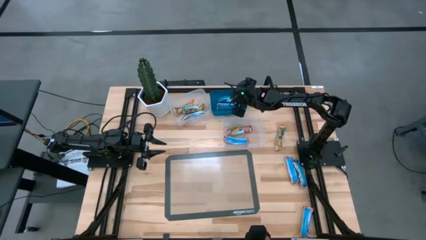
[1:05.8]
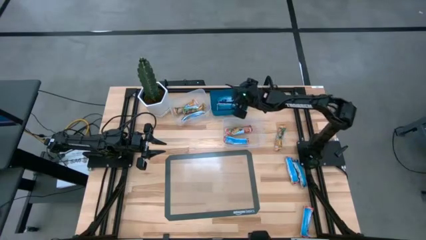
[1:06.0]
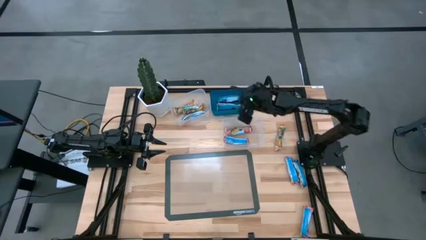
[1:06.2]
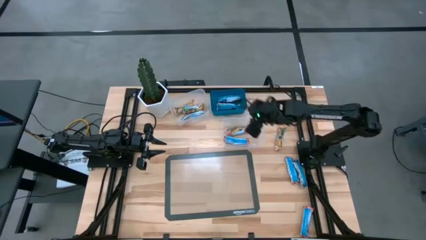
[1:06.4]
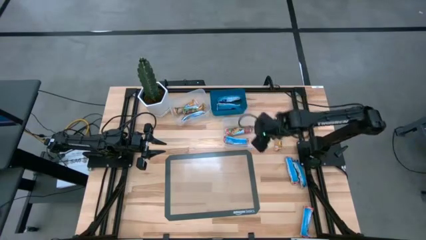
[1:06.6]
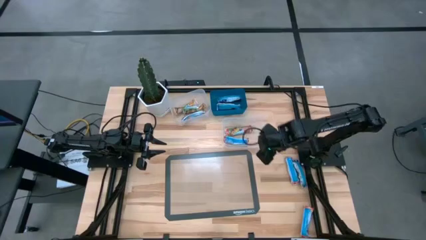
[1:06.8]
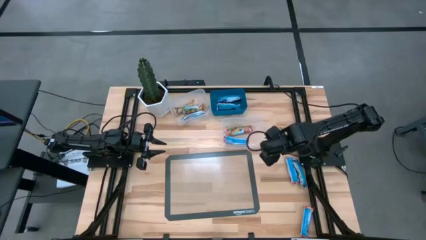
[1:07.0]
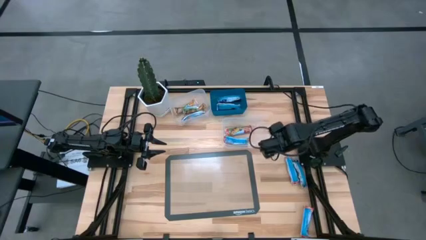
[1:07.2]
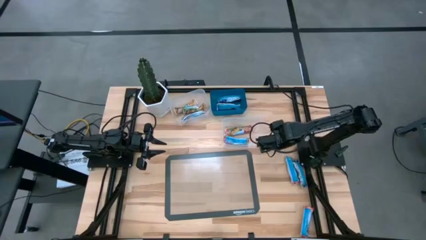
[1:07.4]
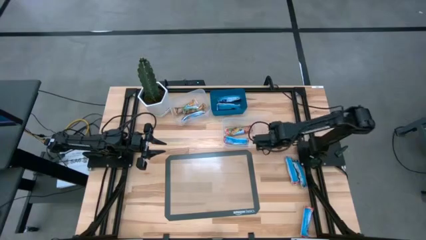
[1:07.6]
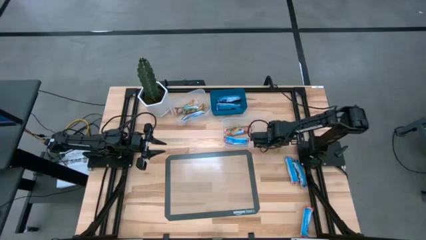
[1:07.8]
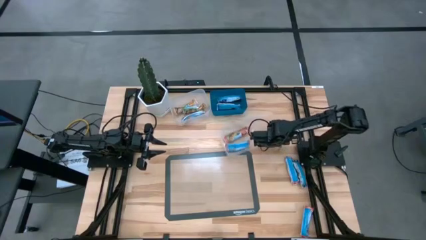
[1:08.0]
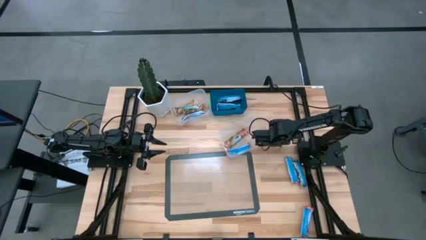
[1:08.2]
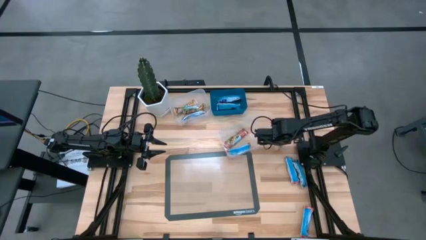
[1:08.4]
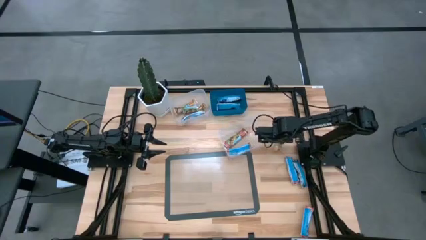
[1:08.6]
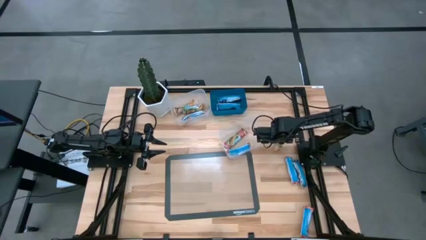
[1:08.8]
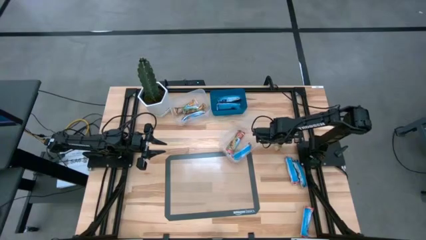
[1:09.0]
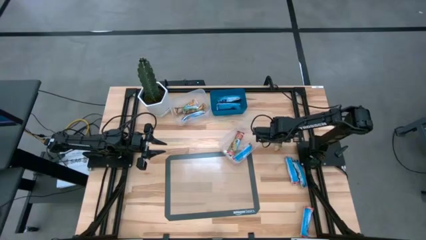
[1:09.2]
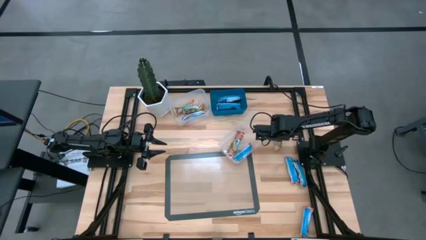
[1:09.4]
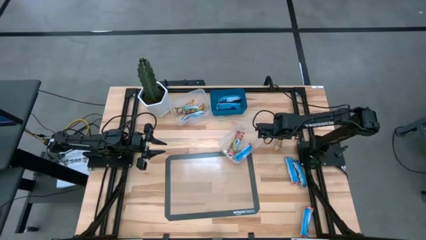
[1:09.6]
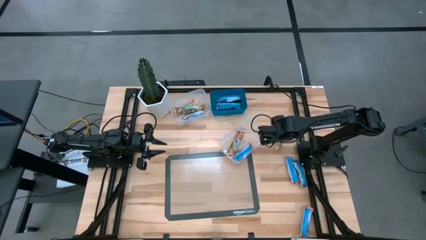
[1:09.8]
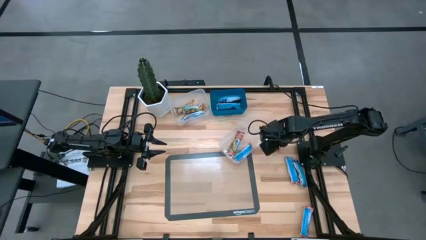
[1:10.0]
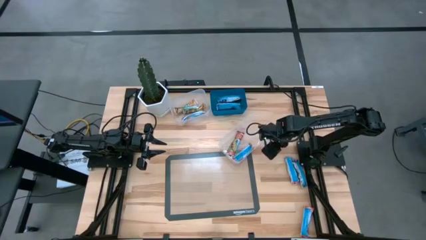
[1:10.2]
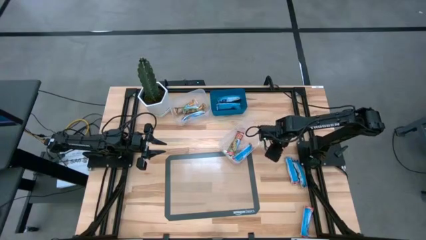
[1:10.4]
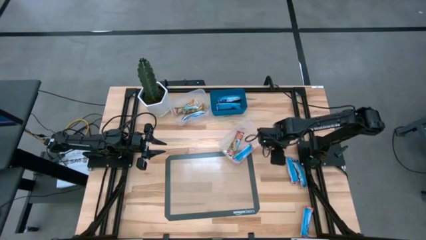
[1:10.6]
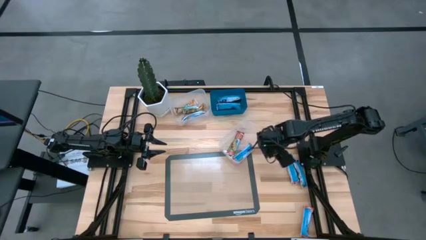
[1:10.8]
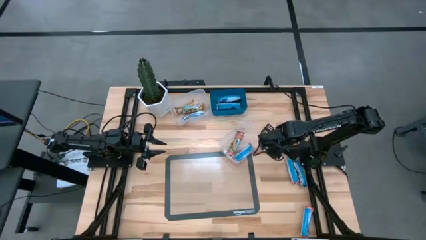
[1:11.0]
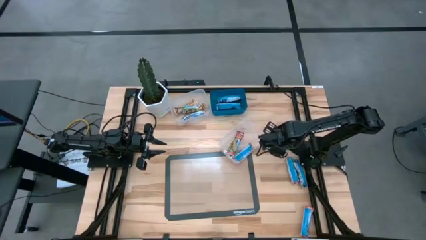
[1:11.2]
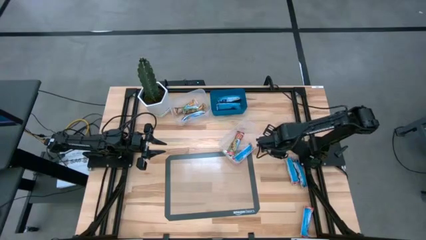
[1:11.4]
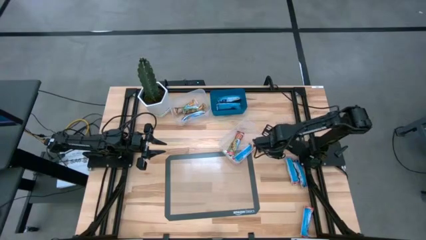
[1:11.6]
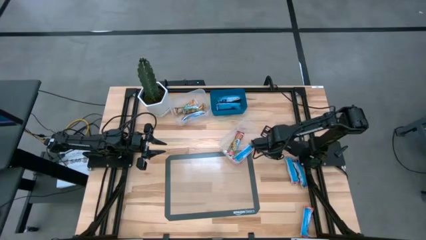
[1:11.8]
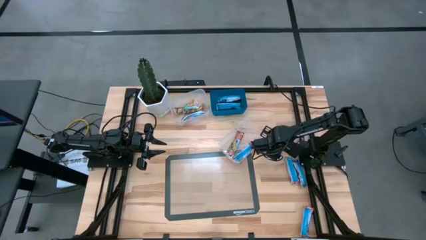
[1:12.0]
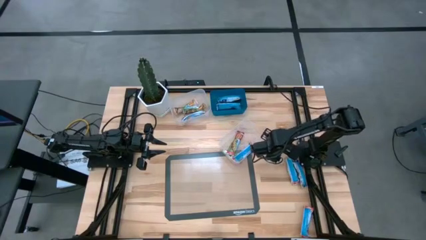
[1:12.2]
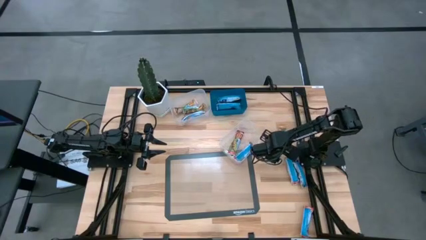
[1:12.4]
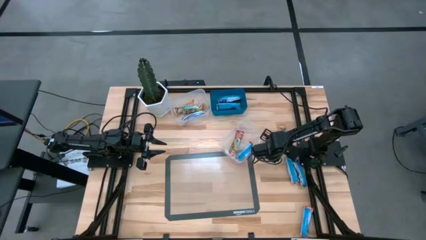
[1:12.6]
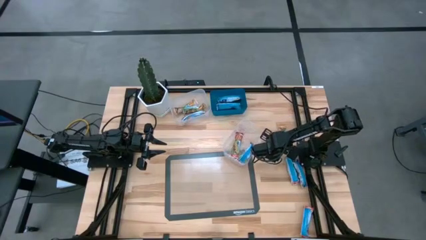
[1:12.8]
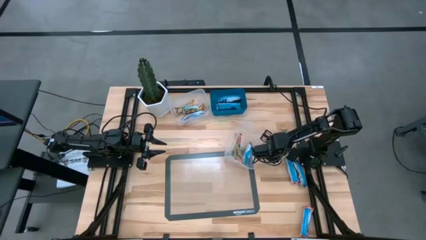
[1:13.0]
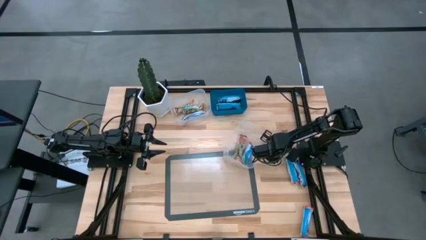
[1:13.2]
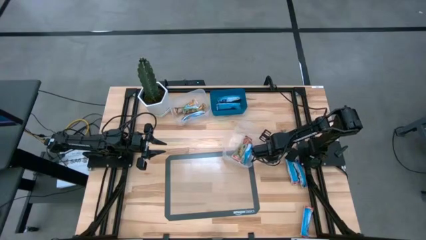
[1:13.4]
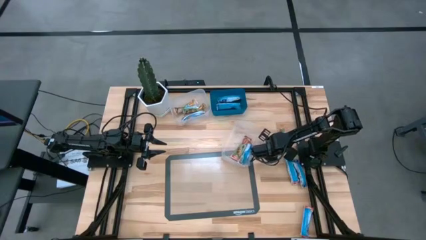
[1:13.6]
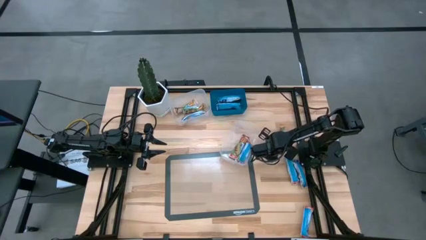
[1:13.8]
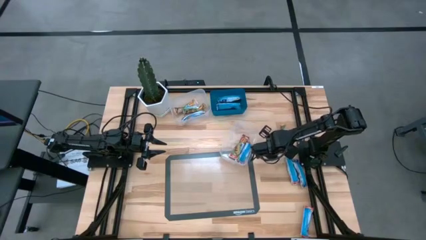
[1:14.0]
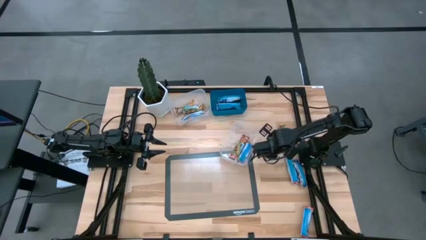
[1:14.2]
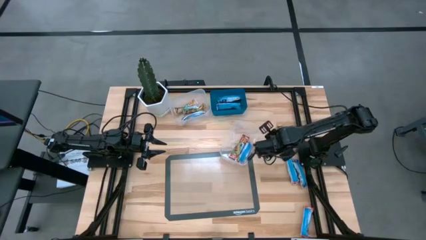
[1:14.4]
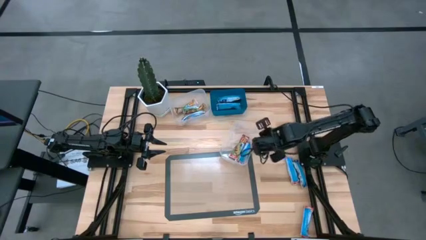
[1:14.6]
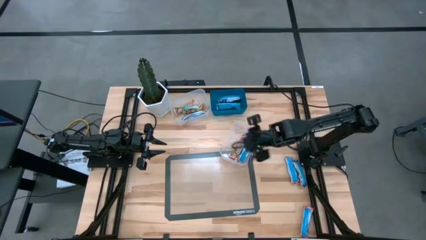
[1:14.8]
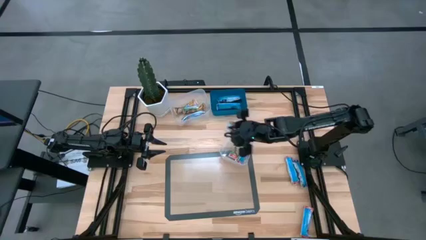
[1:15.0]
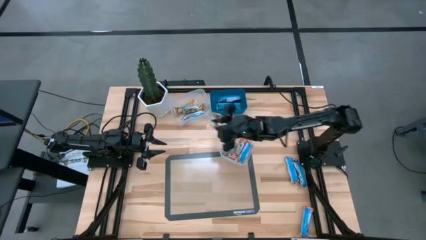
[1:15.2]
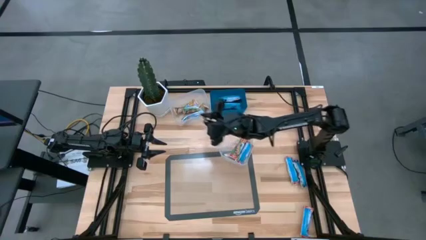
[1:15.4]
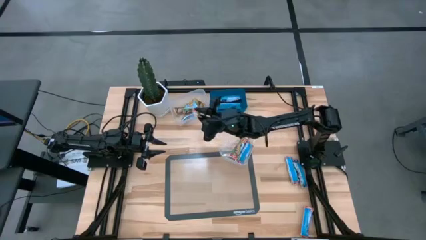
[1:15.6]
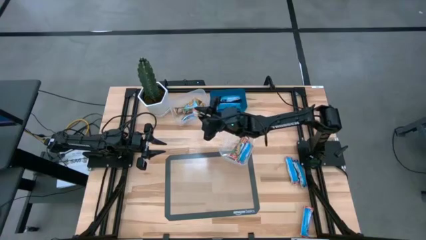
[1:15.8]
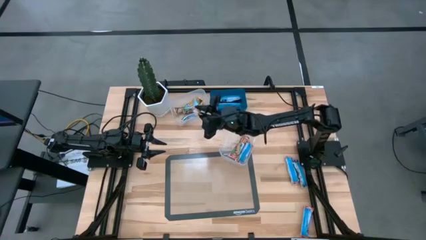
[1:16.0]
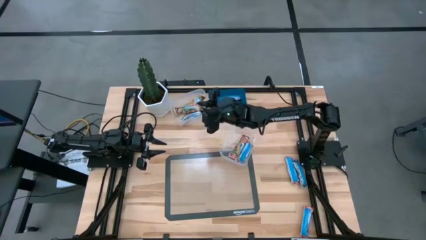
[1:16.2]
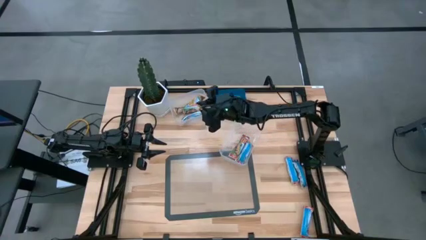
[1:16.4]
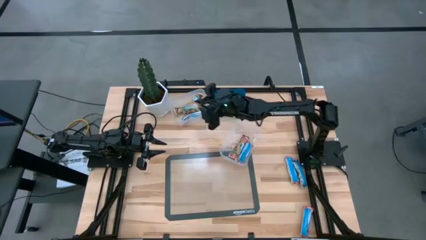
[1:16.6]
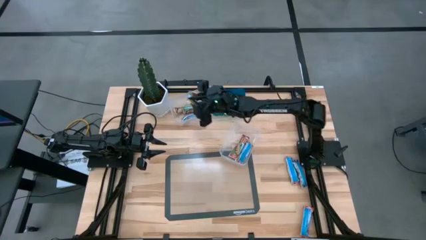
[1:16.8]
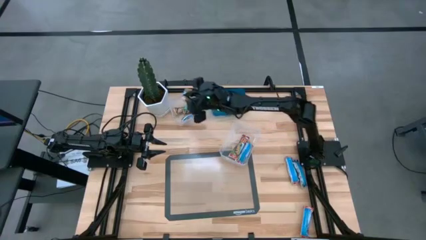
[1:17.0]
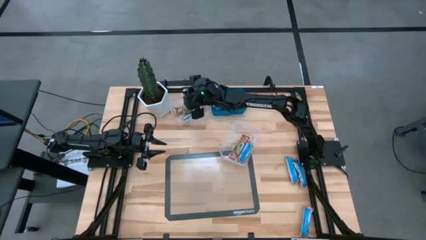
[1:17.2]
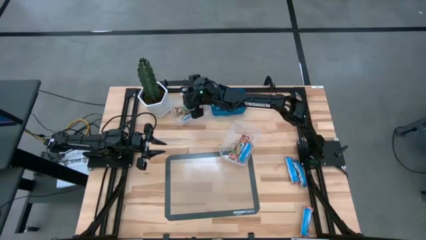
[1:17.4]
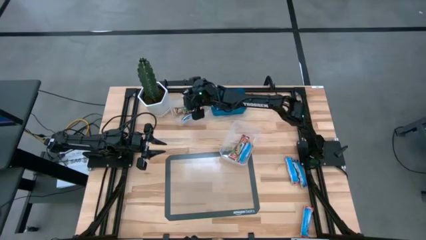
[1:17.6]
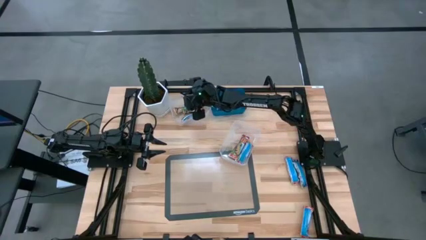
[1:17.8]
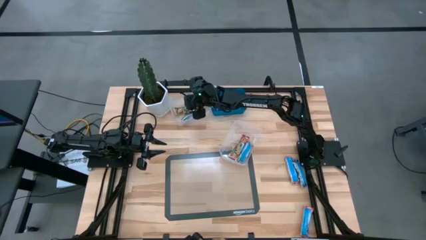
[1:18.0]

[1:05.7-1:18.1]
Task: Pick and place Granola Bars by type
Put the yellow granola bar into the top transparent bin
